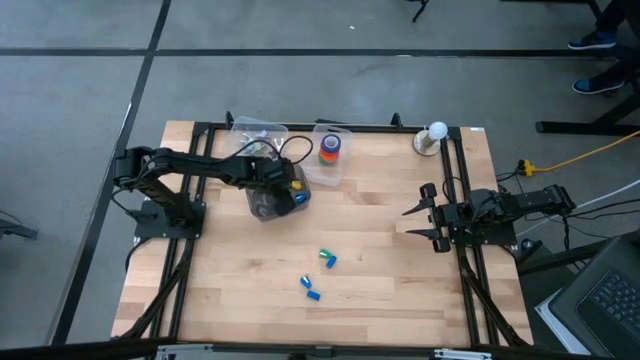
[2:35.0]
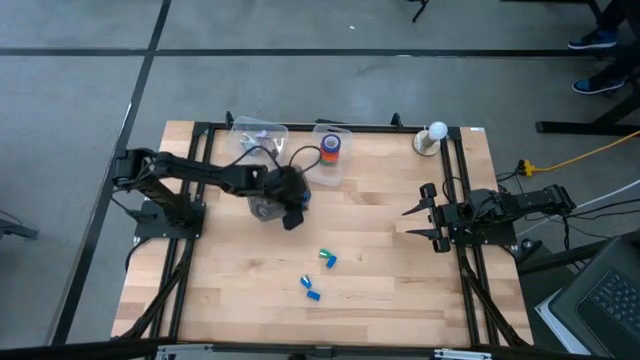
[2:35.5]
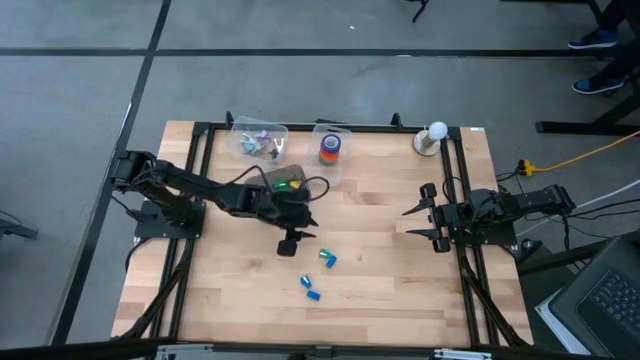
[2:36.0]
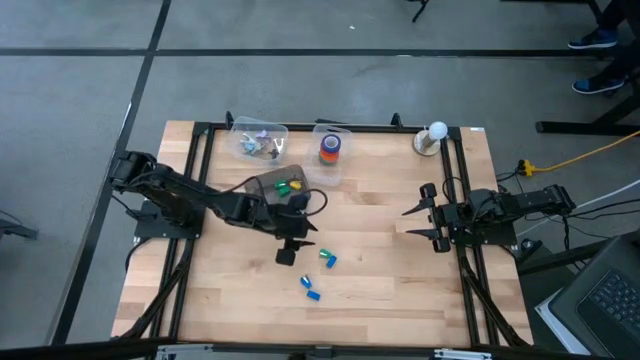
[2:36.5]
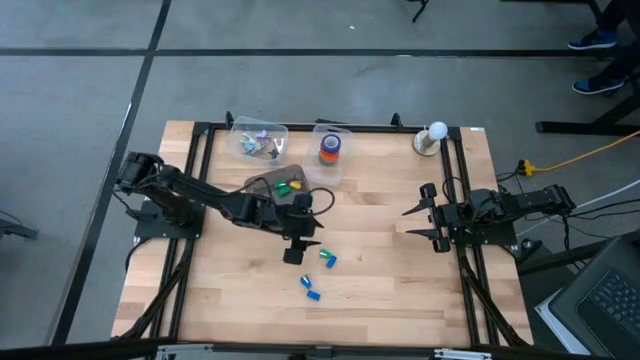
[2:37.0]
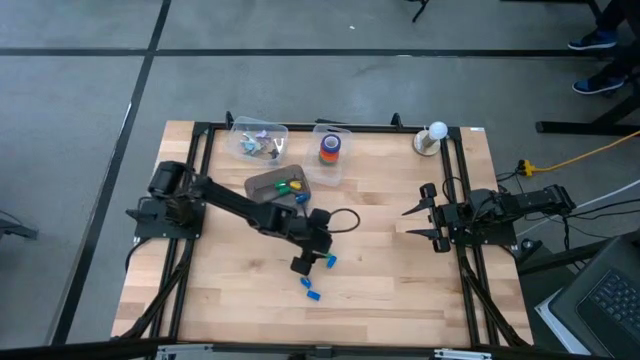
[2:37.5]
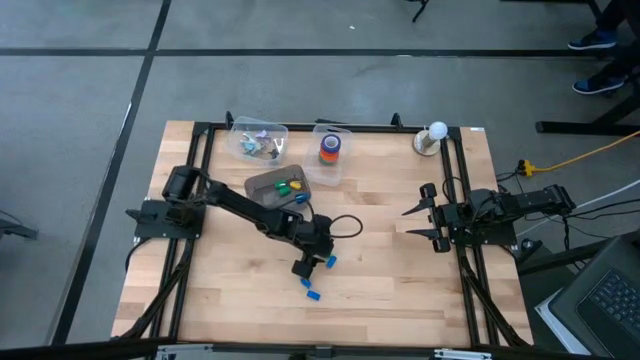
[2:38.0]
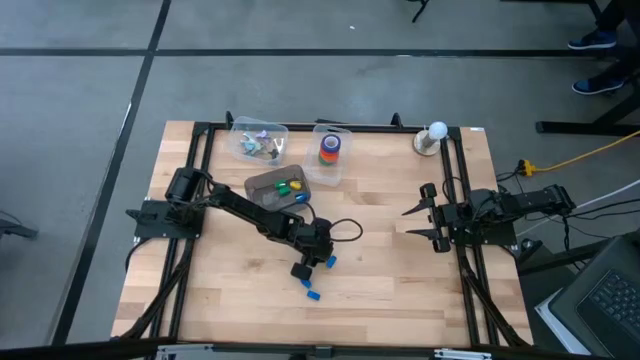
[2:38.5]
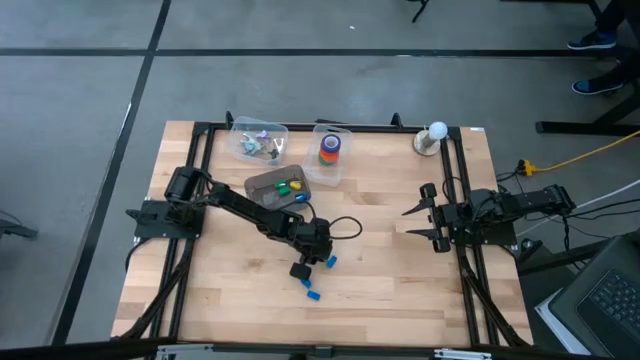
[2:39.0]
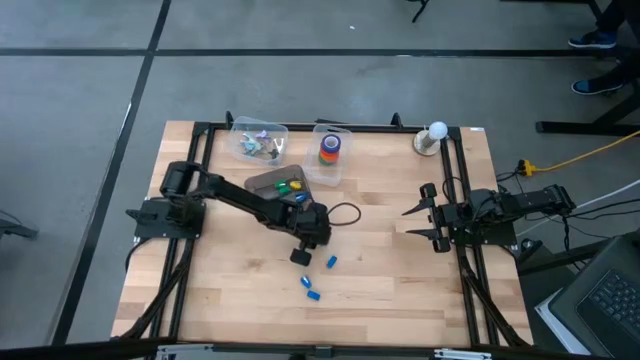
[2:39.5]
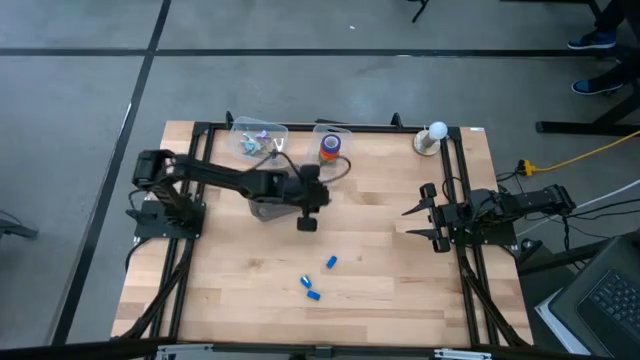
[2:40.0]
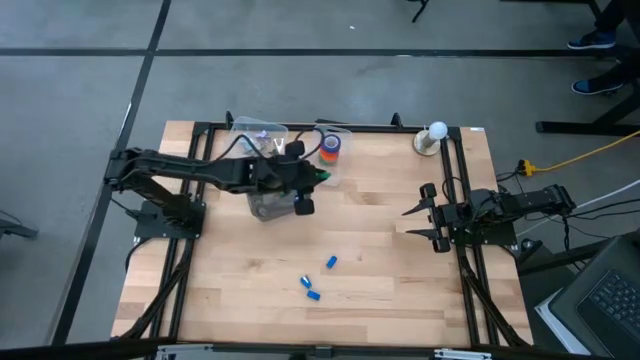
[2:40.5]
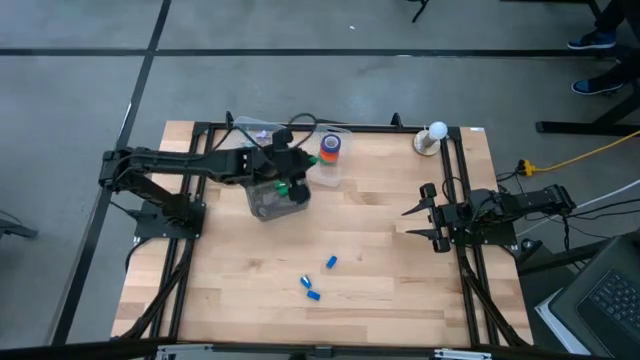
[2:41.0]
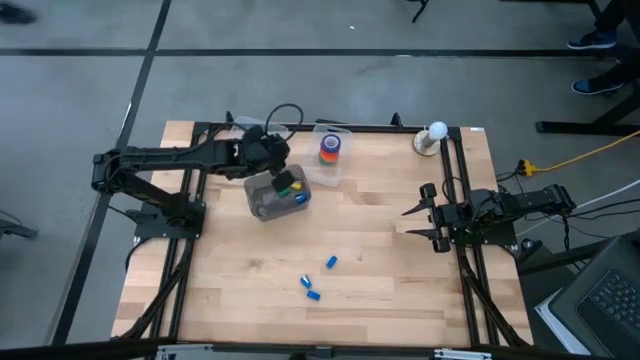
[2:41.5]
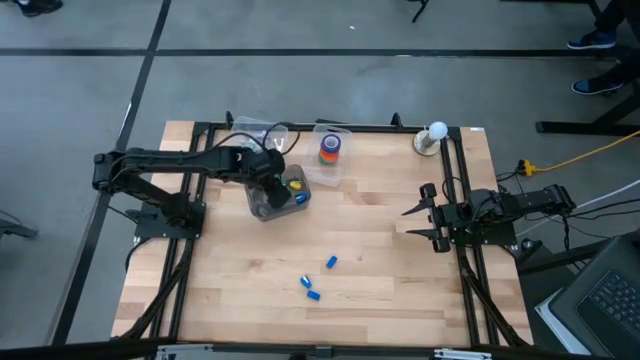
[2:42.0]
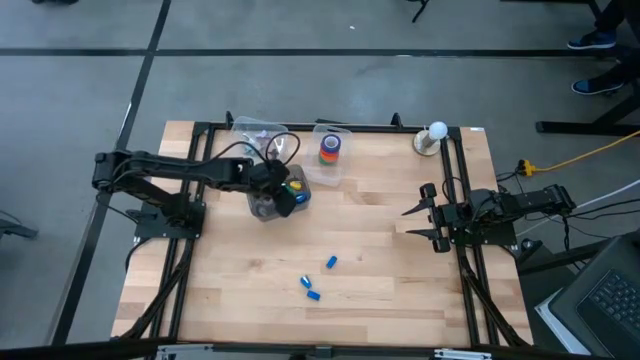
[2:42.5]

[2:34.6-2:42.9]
Task: Pick and place Stapler, Stapler remover, tape
Put the green stapler into the black bin

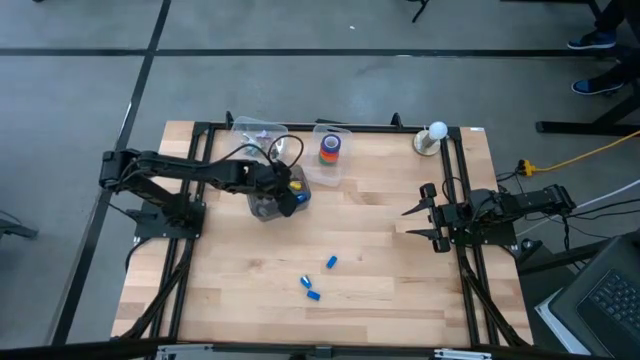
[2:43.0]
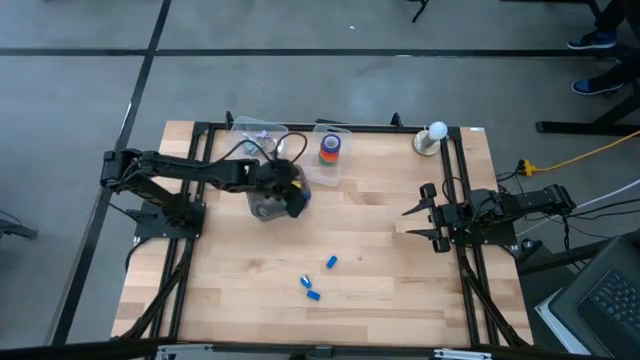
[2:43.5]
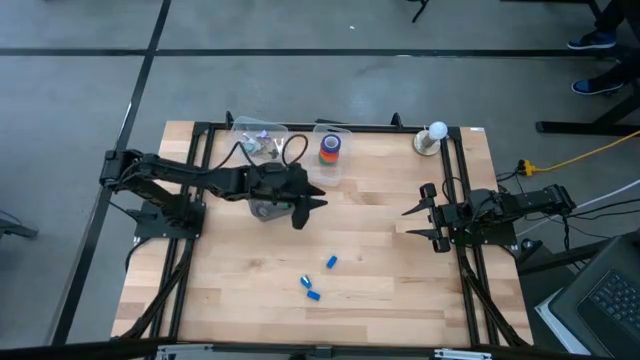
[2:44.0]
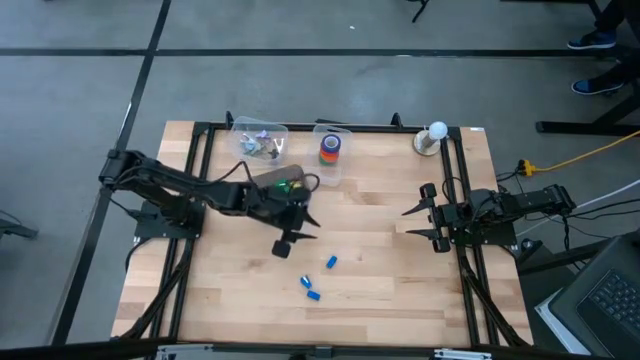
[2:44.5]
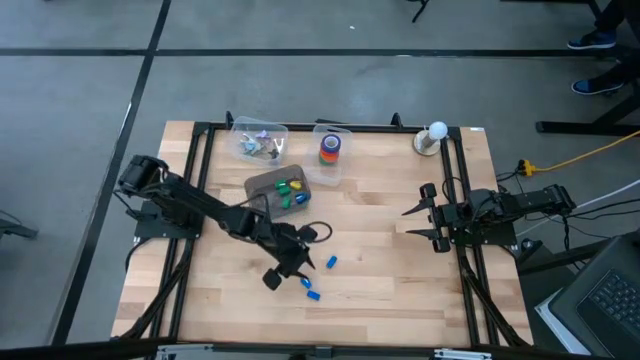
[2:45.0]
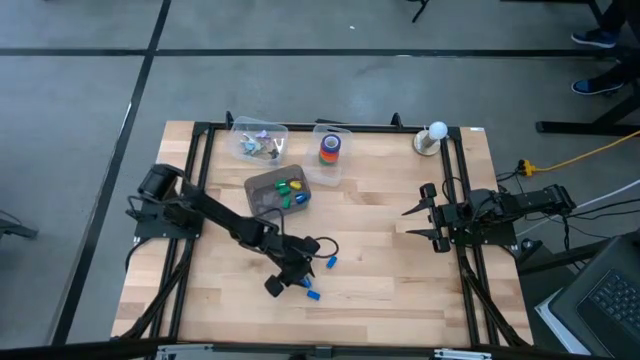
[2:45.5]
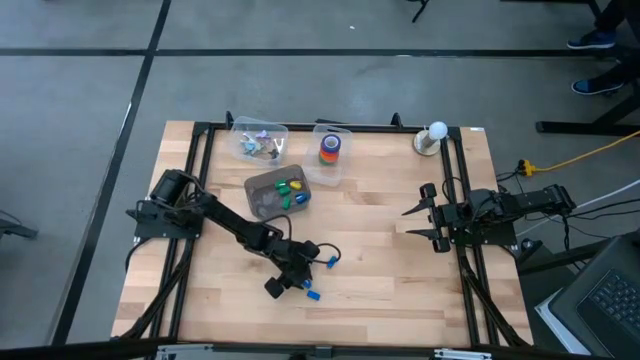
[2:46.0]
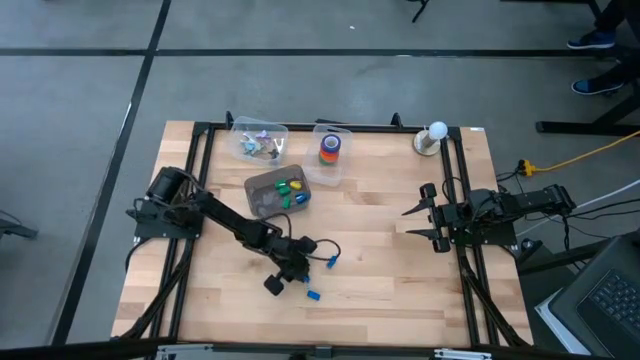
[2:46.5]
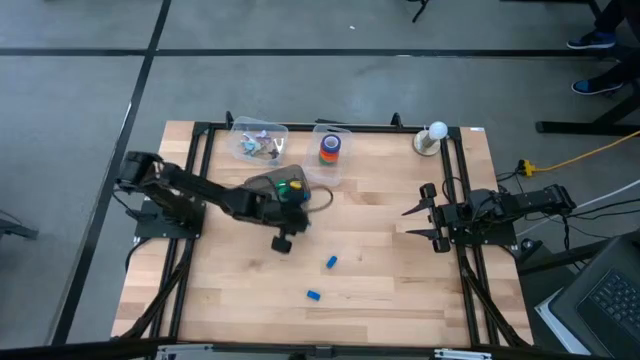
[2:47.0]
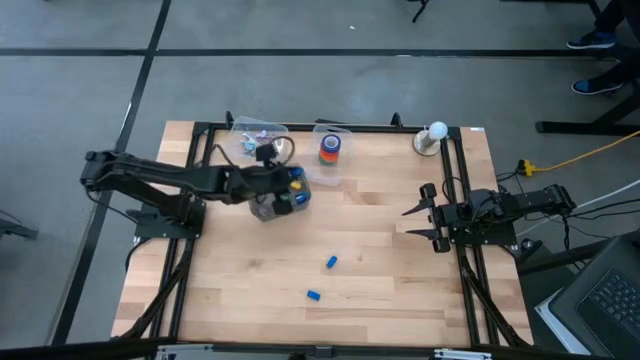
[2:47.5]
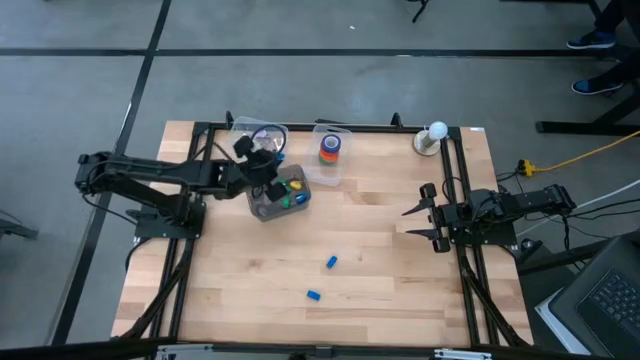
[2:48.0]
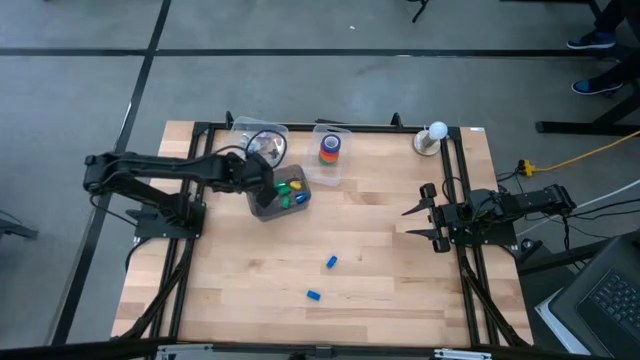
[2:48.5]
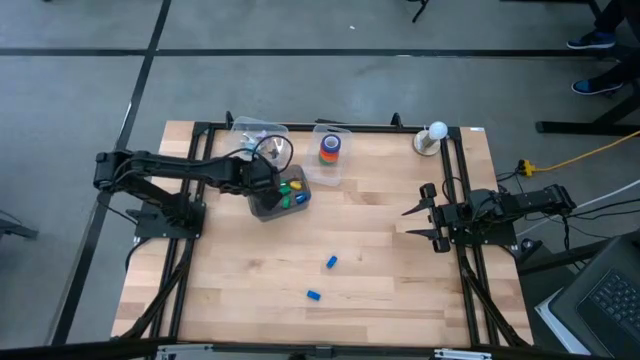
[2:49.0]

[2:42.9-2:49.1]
Put the blue stapler into the black bin

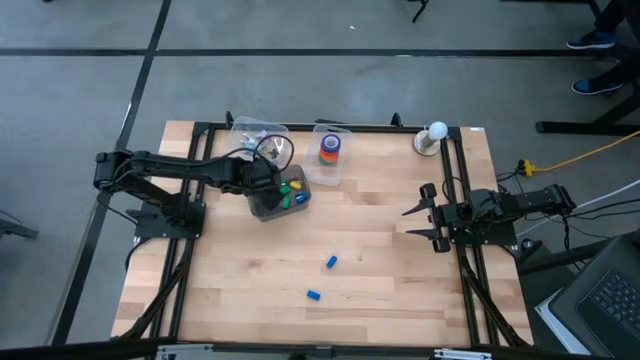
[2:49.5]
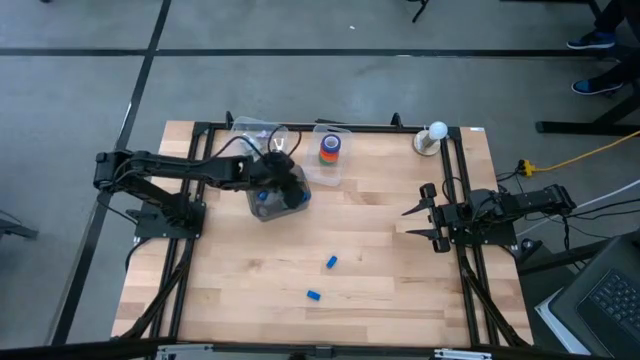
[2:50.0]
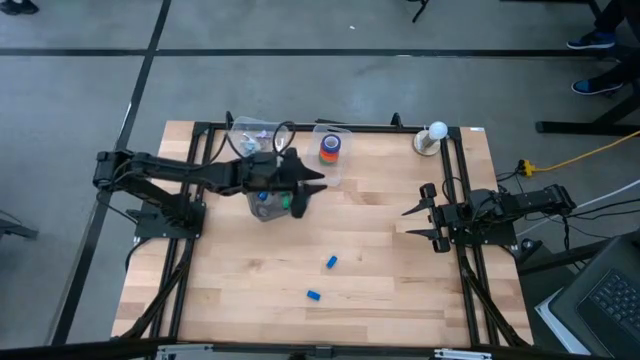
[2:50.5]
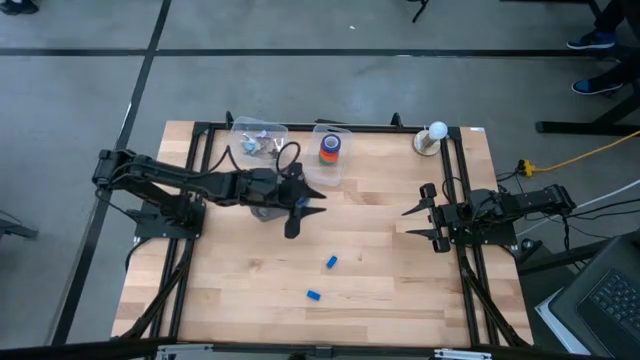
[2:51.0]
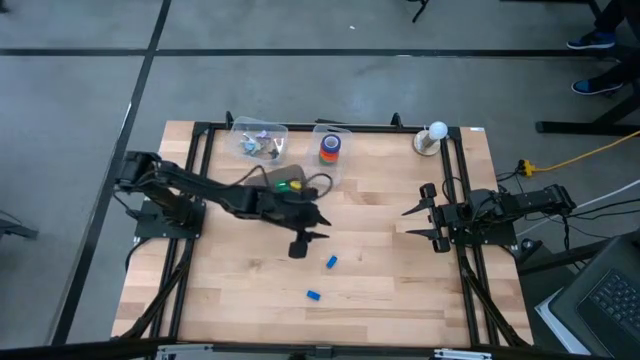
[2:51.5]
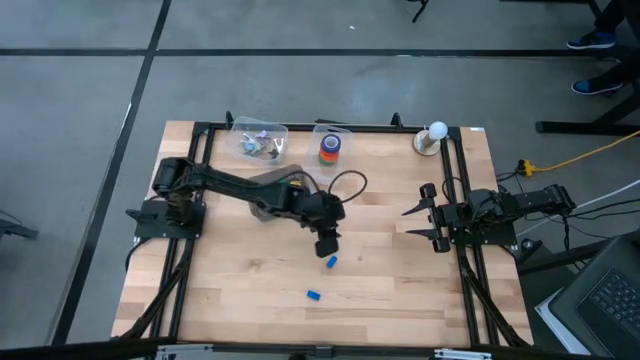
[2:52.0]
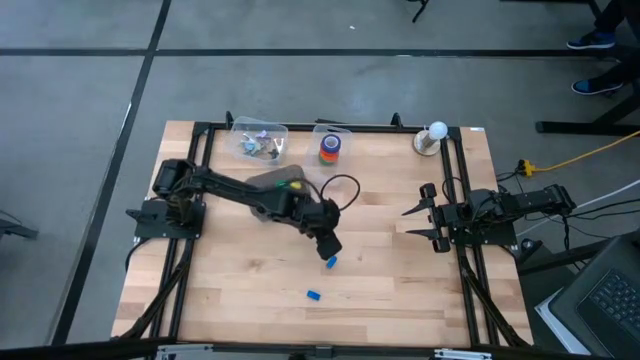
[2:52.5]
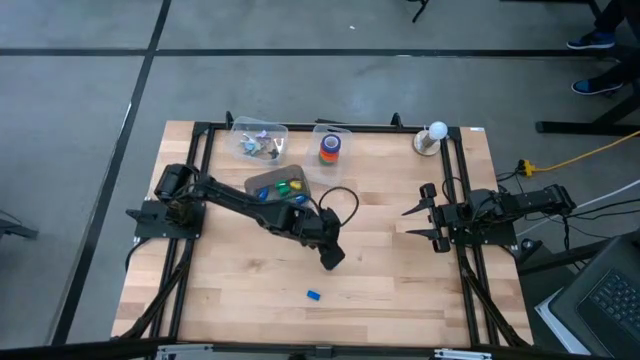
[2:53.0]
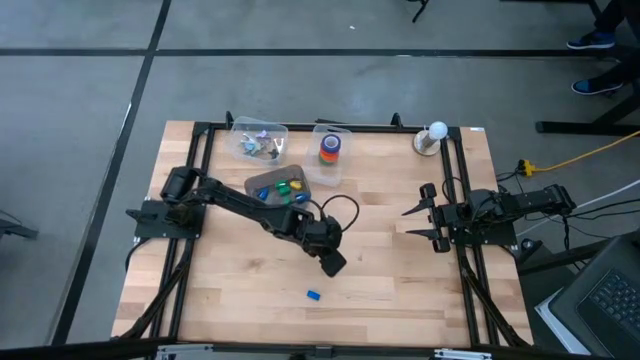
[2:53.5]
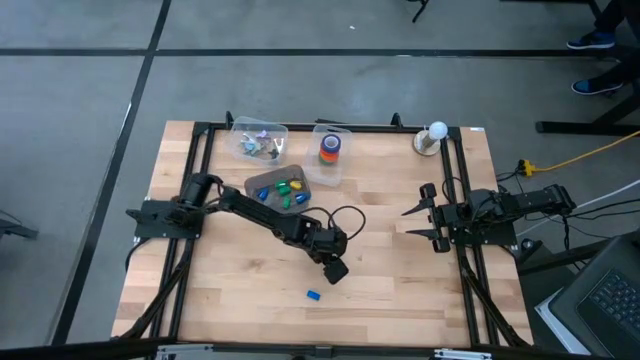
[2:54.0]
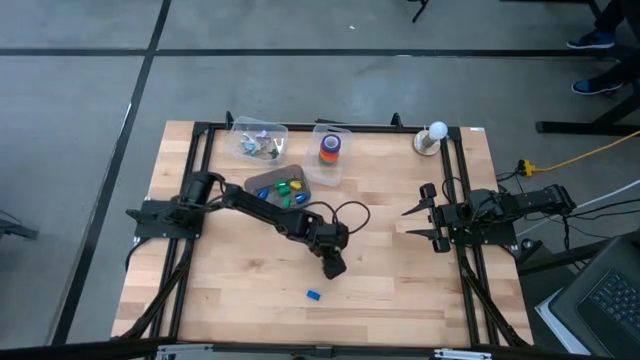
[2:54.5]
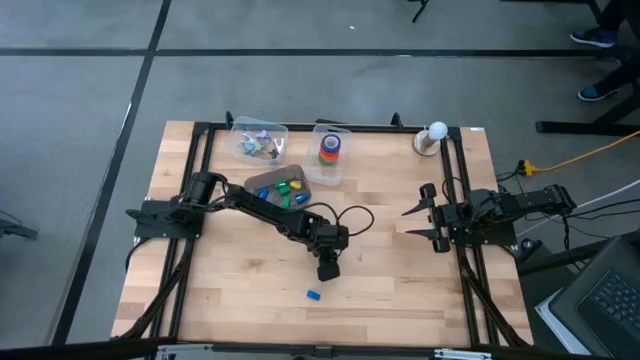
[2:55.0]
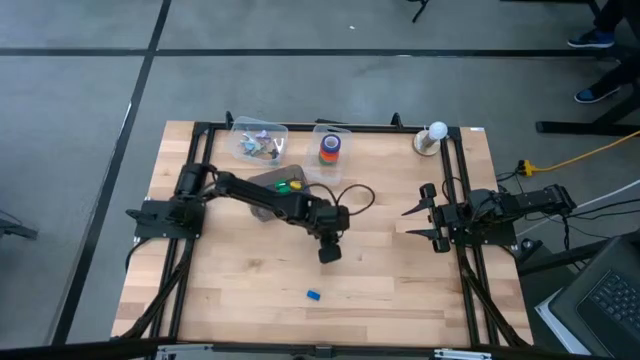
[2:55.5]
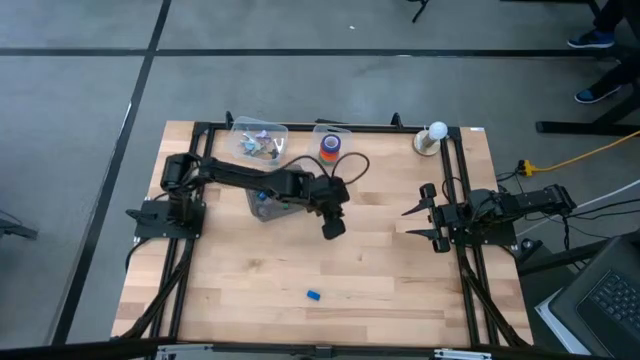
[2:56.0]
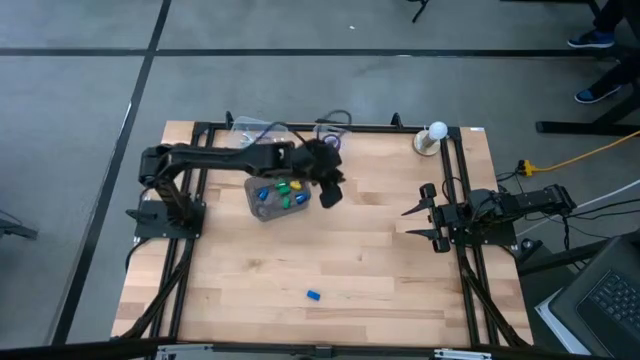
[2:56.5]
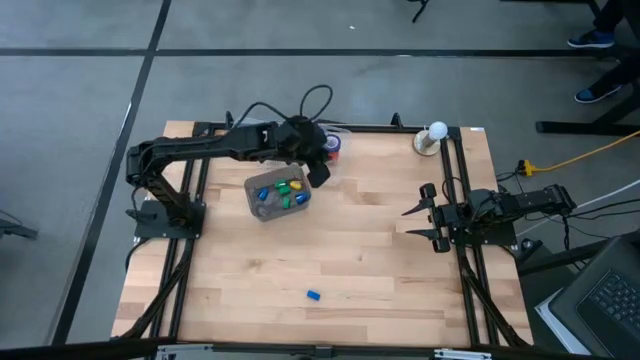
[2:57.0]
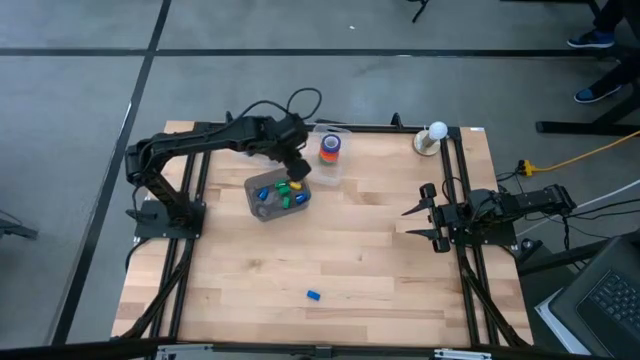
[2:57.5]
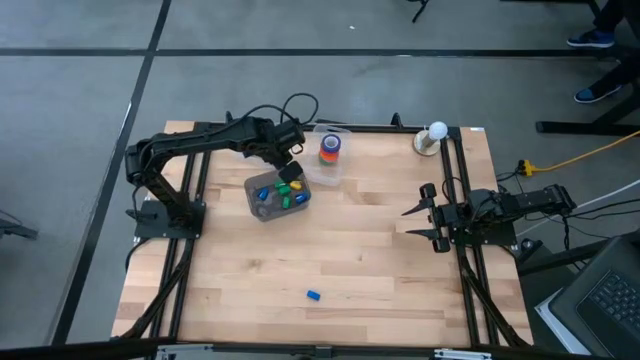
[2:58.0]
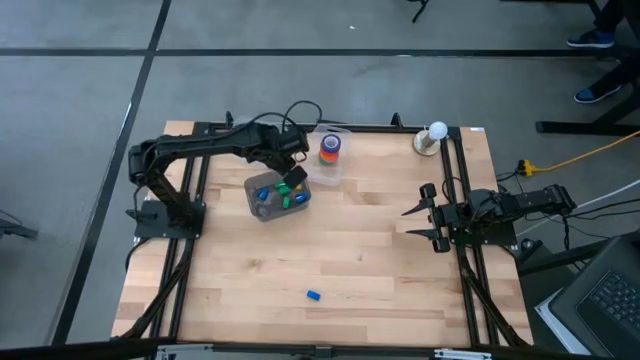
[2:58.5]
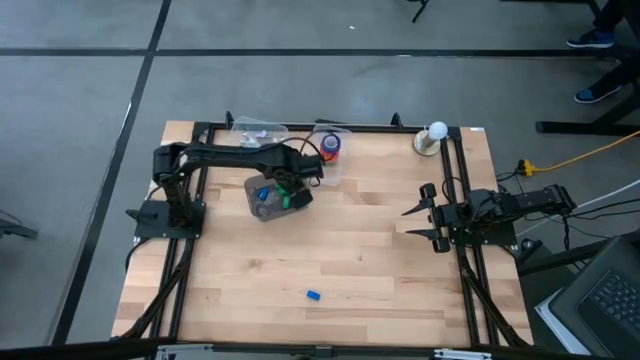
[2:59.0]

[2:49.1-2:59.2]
Put the blue stapler into the black bin
